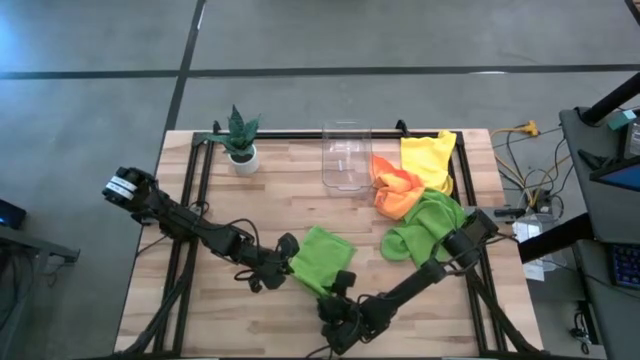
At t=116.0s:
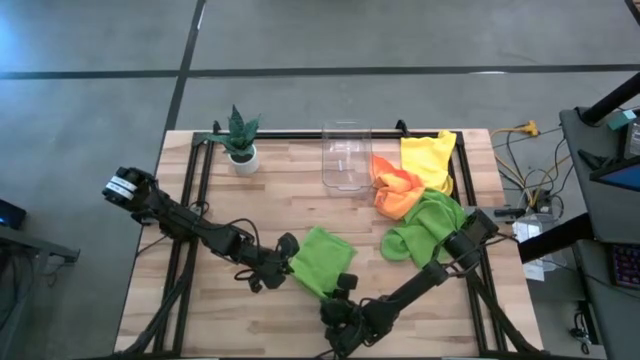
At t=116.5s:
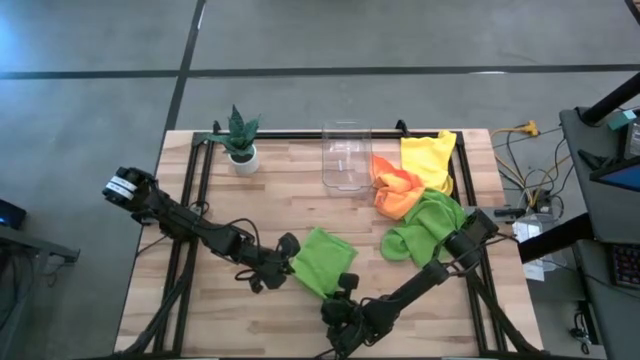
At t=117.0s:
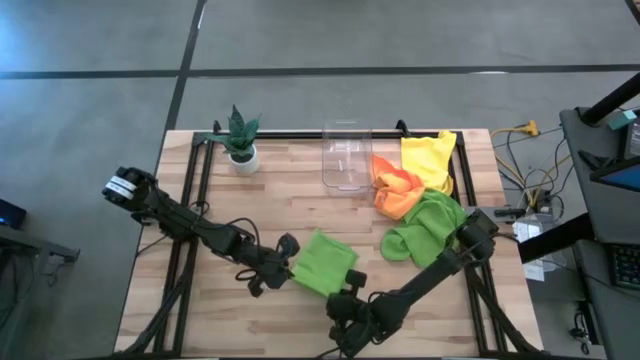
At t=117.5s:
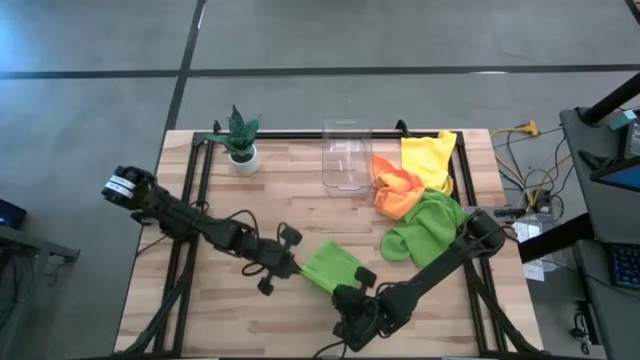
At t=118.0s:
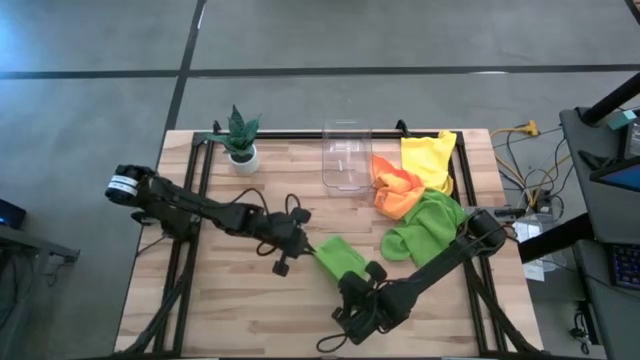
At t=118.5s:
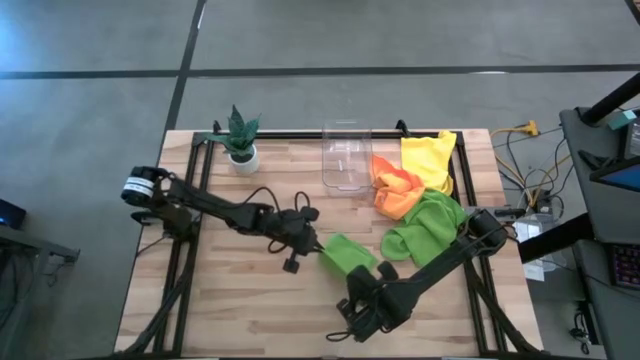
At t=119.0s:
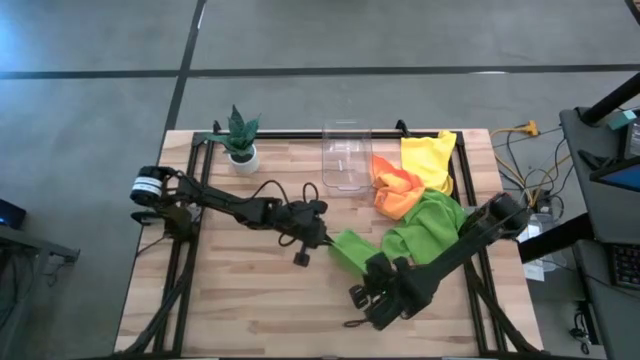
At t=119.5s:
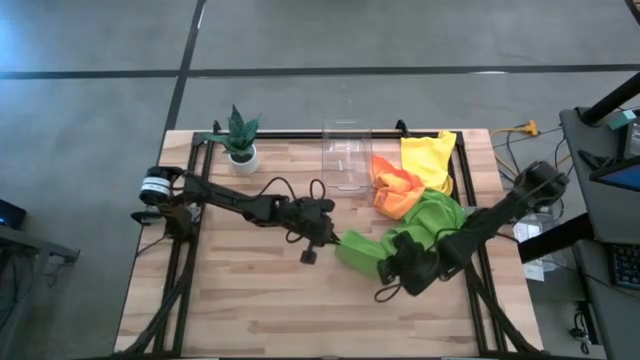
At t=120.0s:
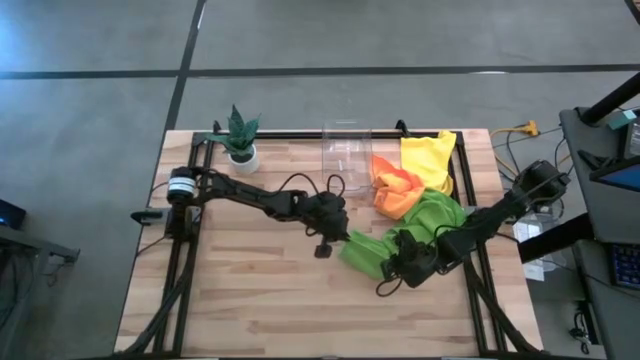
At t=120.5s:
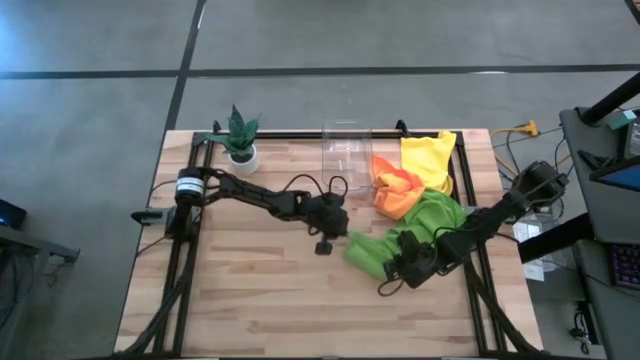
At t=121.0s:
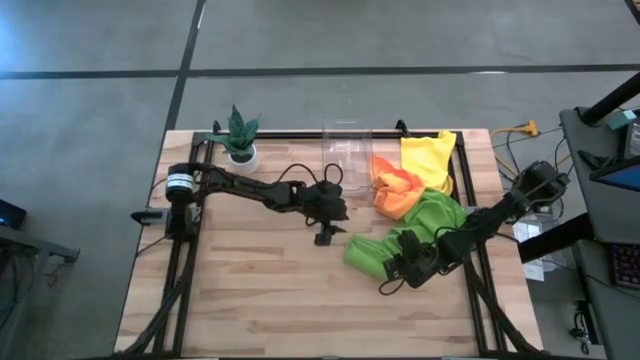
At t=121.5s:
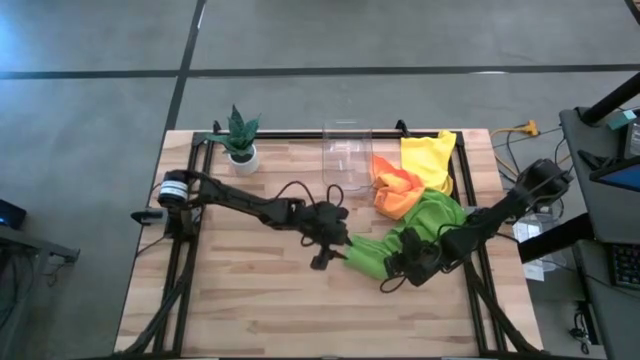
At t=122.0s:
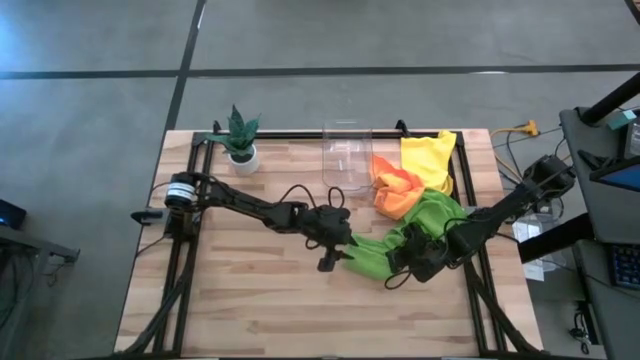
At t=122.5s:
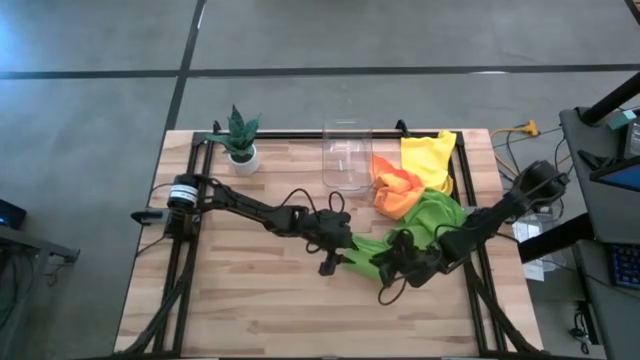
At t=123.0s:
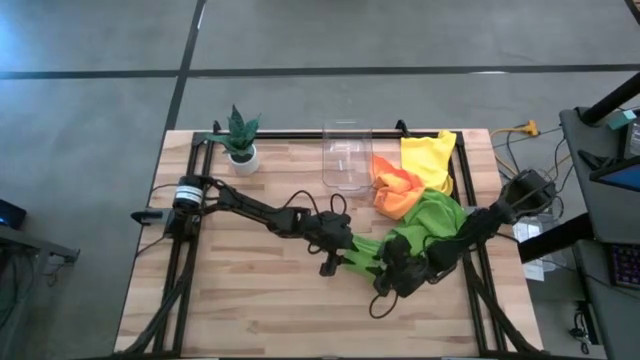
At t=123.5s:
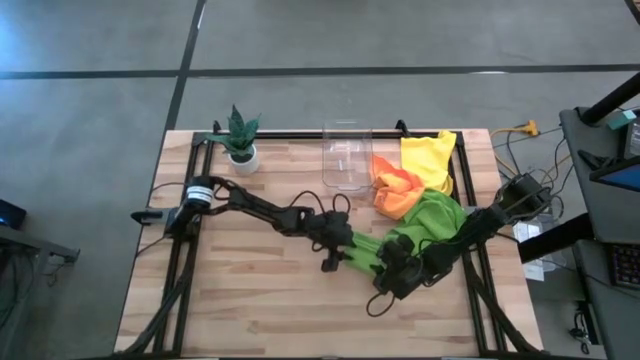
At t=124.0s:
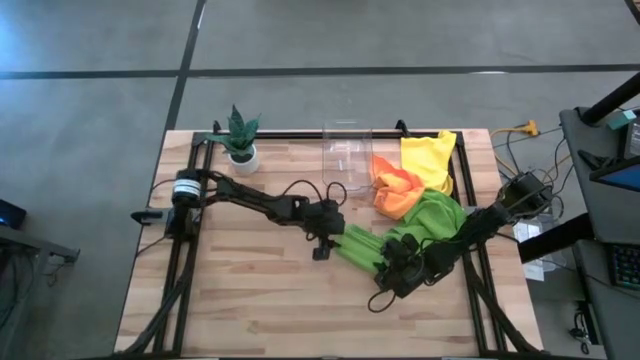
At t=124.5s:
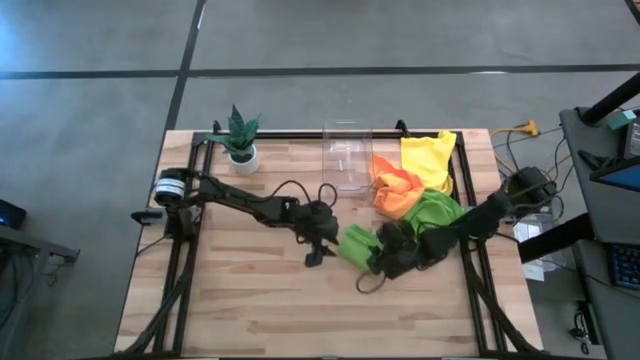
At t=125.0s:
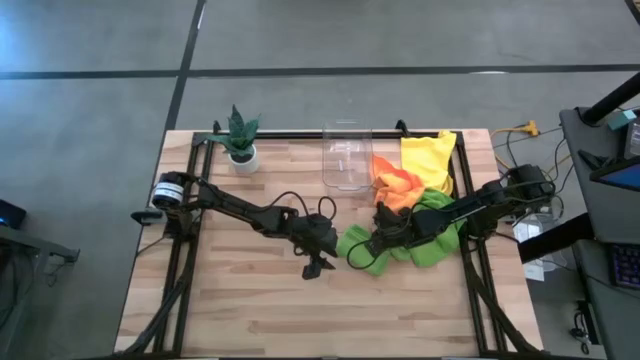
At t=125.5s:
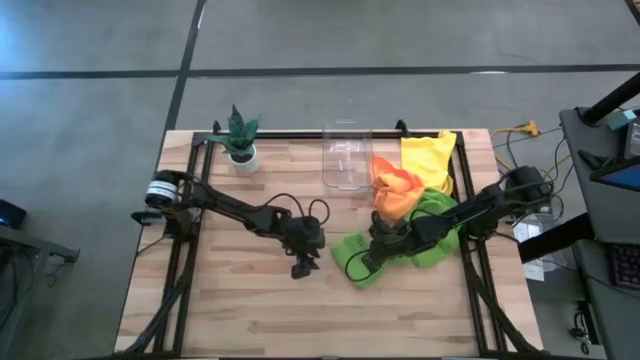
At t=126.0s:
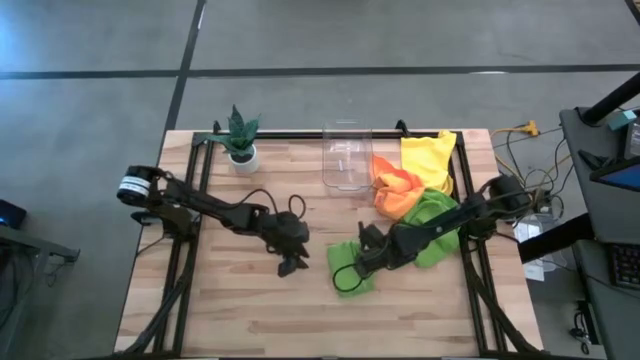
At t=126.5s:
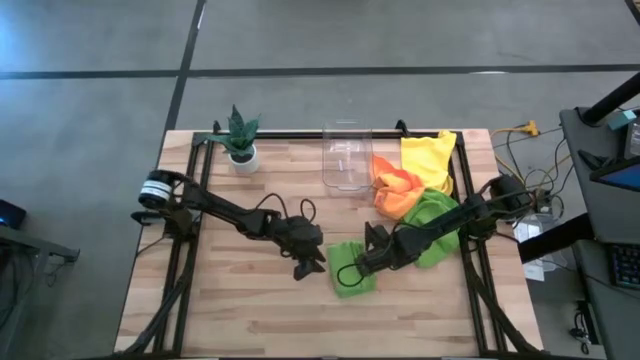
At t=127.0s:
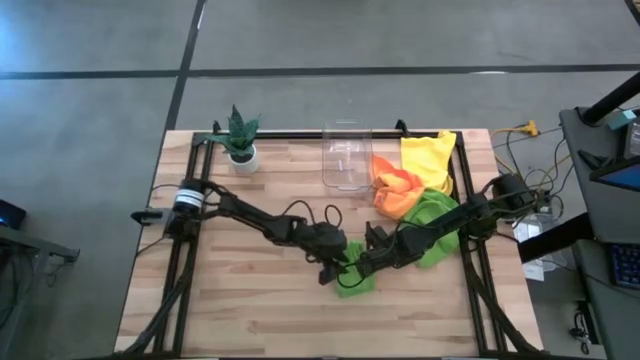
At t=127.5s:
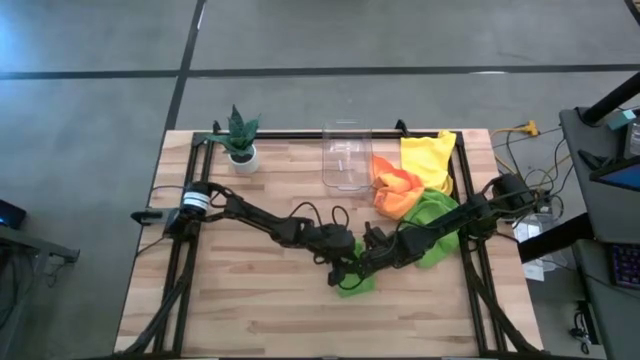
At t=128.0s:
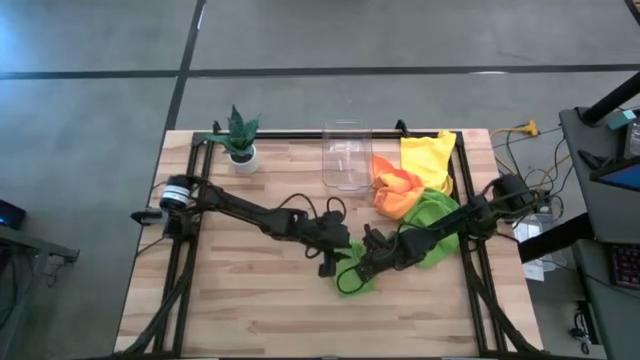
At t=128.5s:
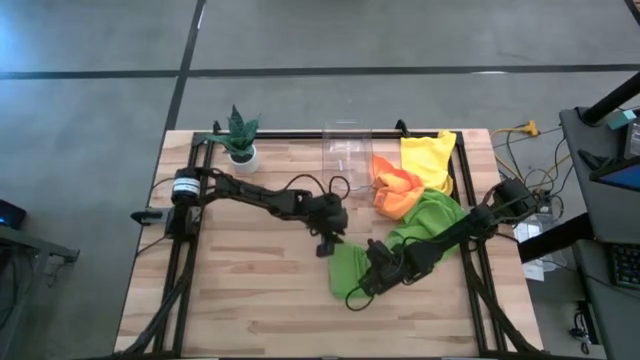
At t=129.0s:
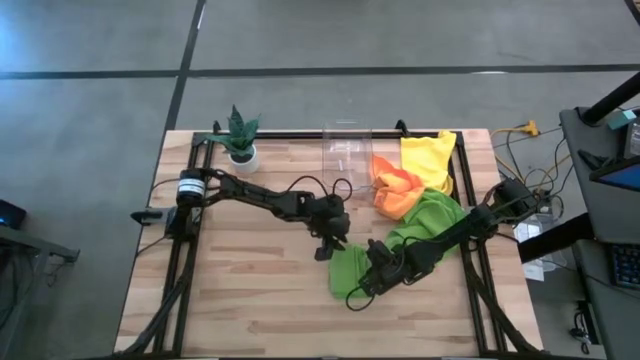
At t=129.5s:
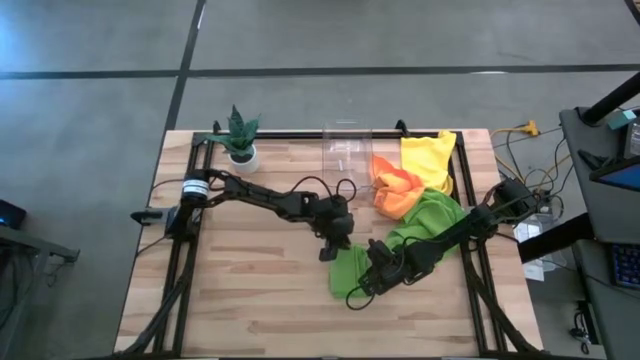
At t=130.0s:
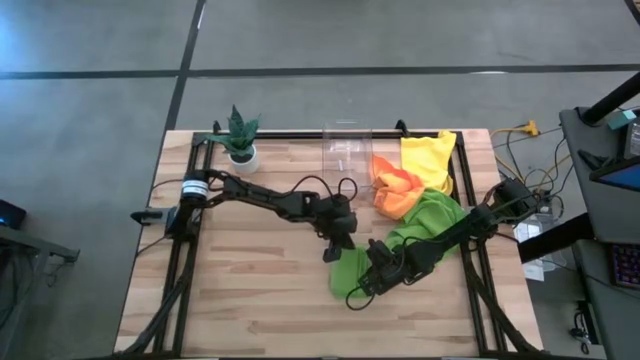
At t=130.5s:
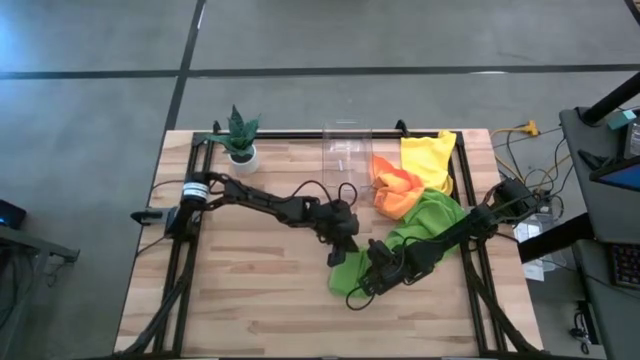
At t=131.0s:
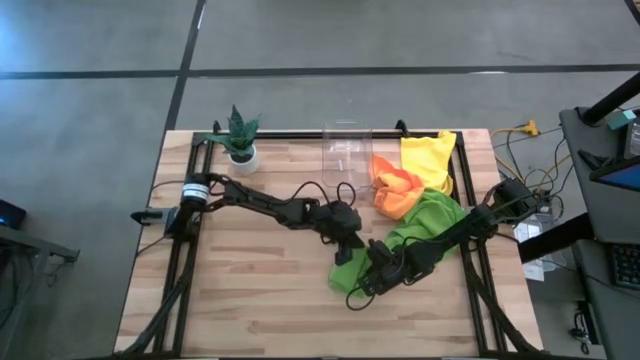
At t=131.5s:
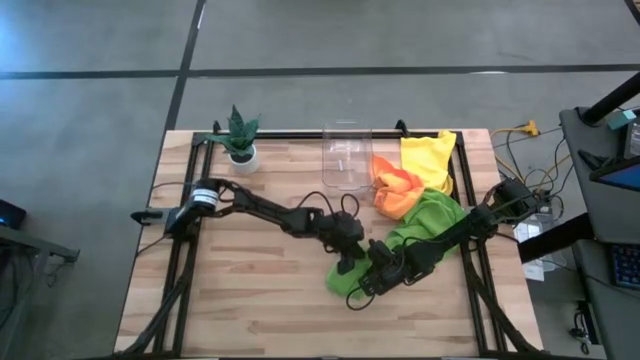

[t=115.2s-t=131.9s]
Task: Fold microfiber towels
Fold the top green towel

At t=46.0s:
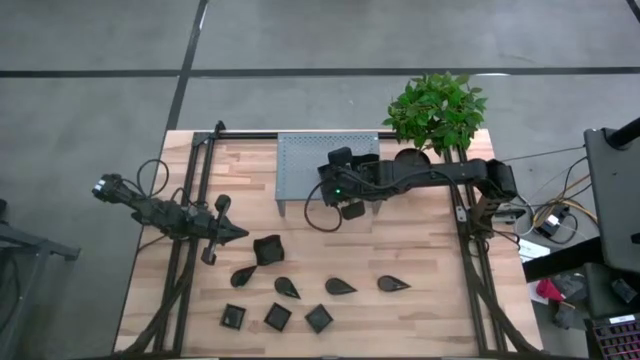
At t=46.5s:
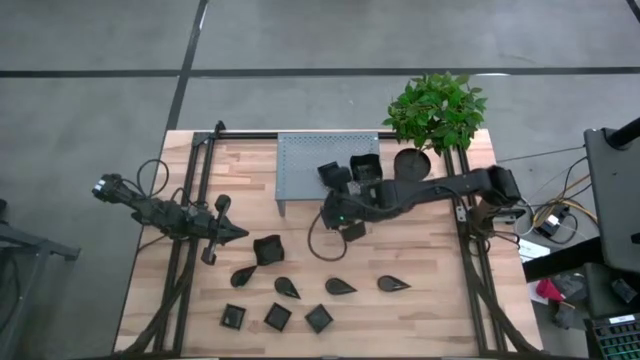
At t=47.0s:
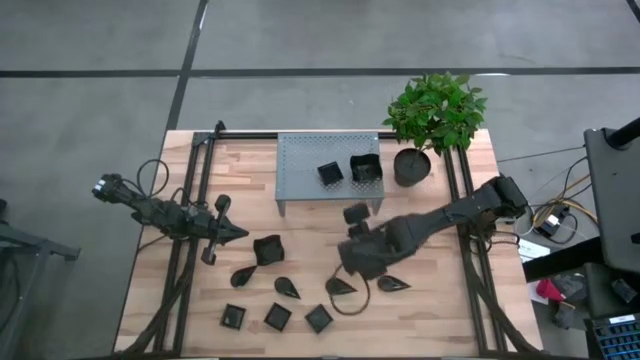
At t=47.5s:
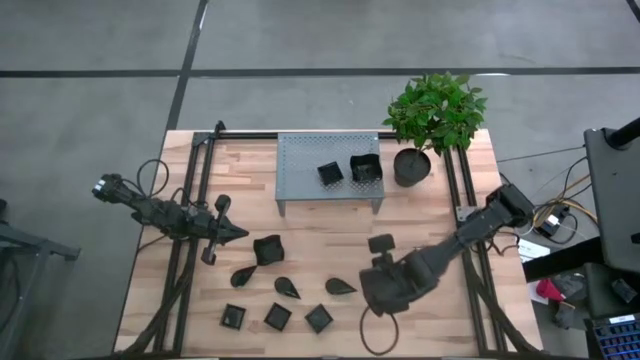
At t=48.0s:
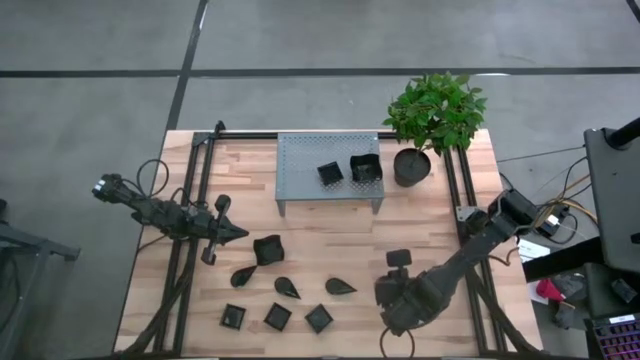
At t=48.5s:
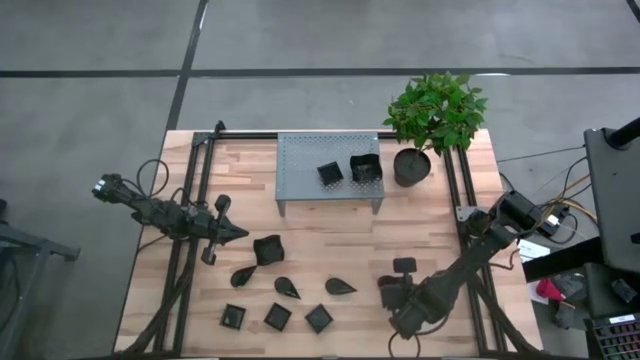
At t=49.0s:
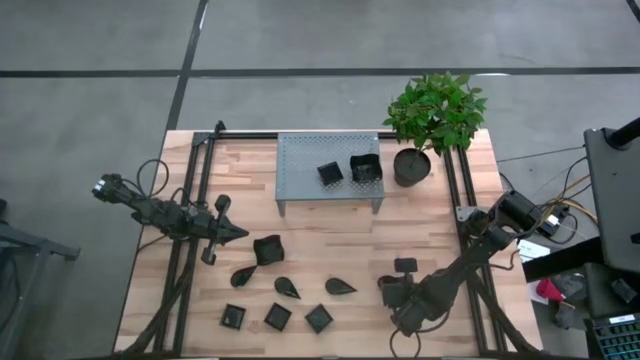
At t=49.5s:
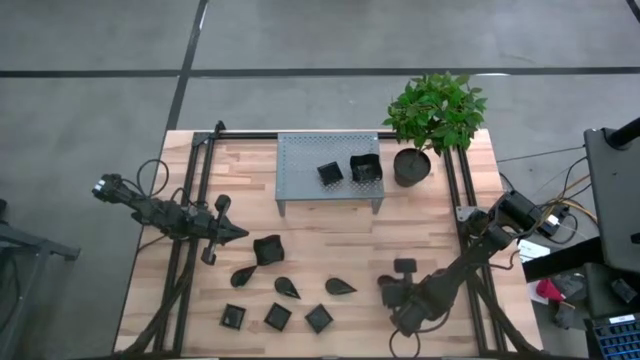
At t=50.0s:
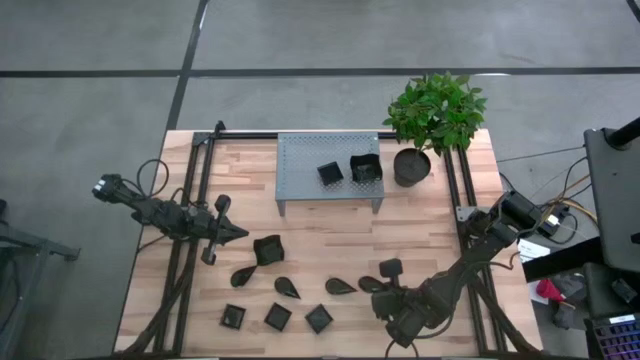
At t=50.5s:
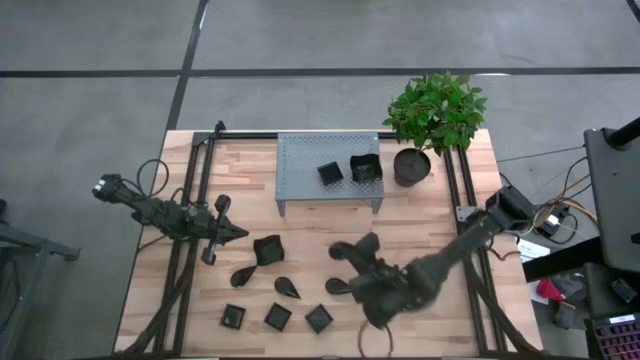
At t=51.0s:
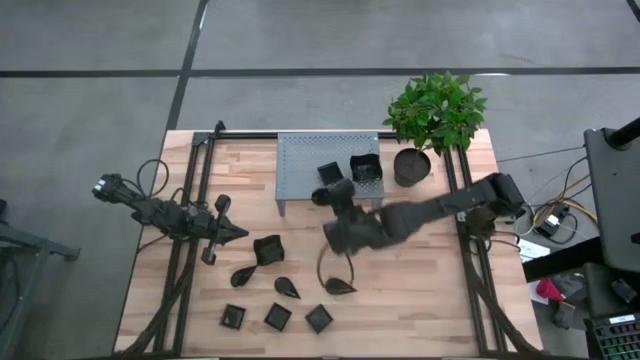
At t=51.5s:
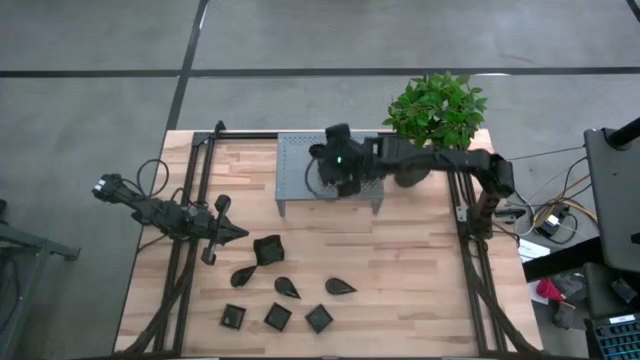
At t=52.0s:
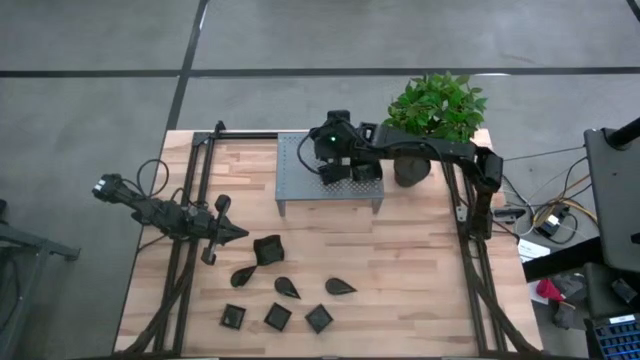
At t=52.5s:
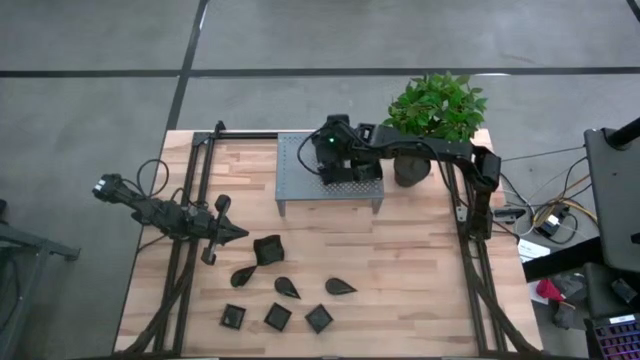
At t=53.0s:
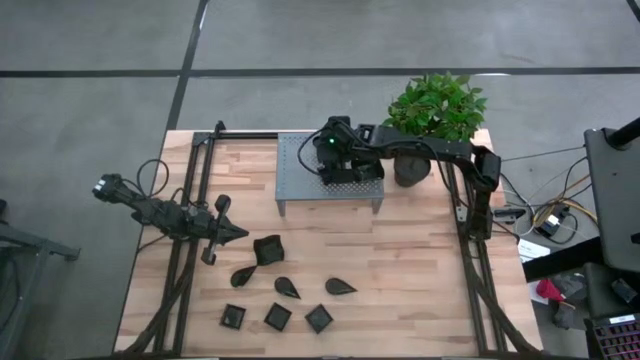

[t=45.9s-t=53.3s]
Task: Pick & Place Mini shaped plates
Put the black drop-shaped plate on the shelf
